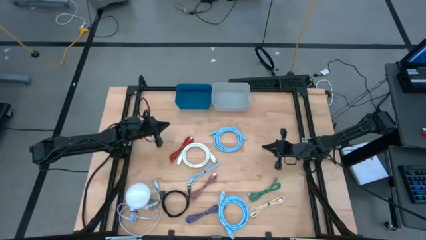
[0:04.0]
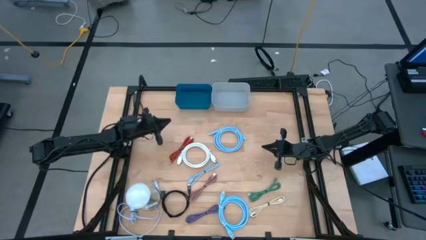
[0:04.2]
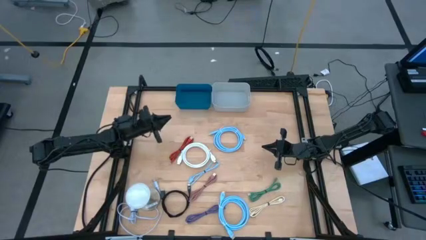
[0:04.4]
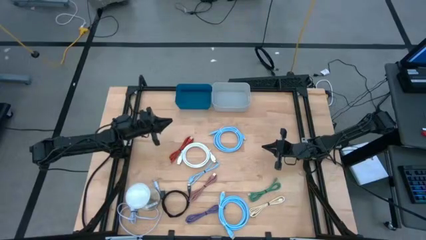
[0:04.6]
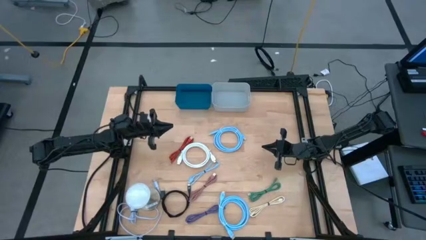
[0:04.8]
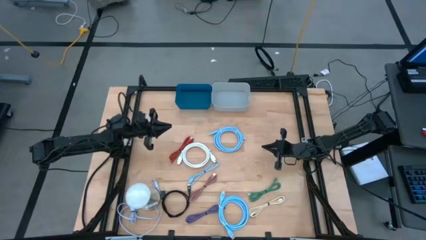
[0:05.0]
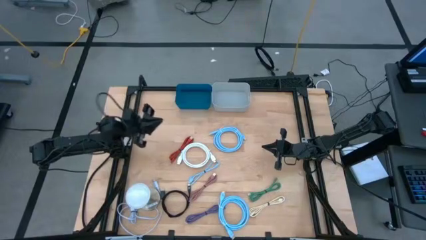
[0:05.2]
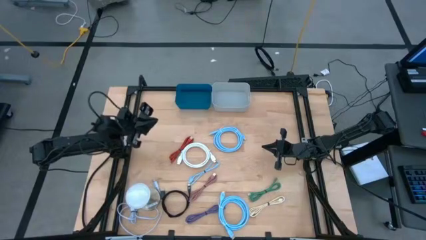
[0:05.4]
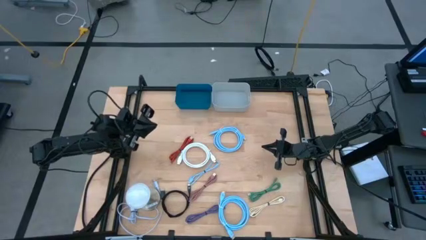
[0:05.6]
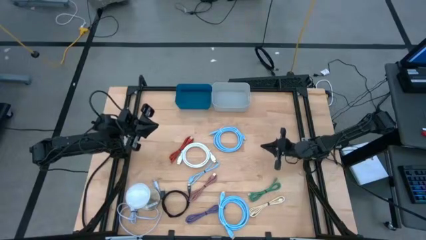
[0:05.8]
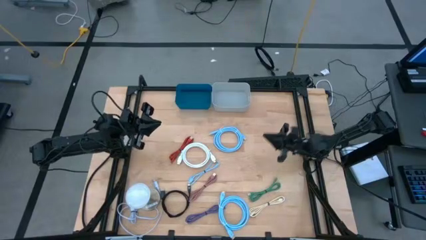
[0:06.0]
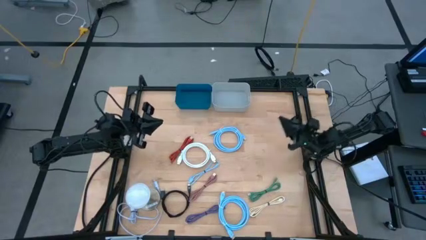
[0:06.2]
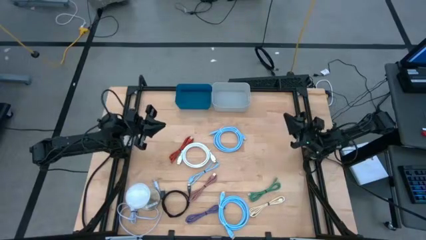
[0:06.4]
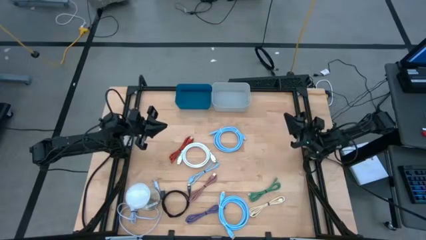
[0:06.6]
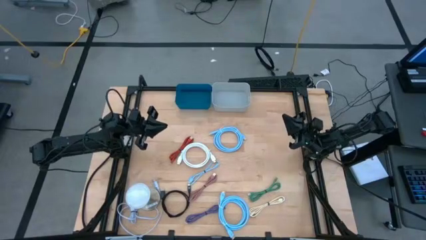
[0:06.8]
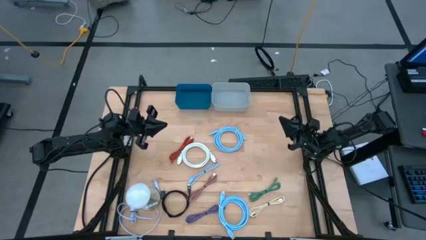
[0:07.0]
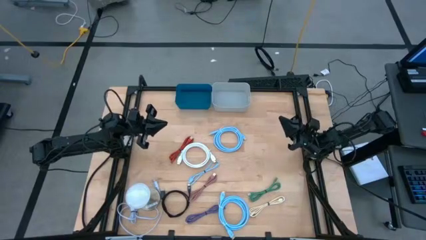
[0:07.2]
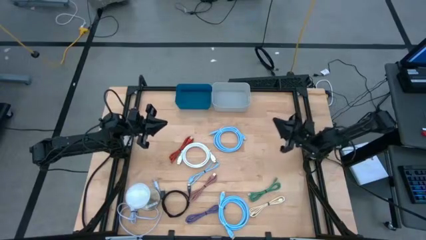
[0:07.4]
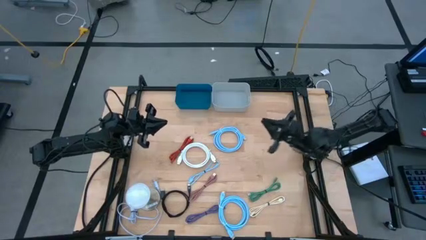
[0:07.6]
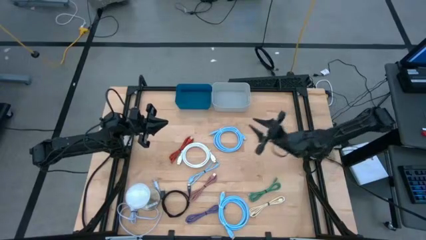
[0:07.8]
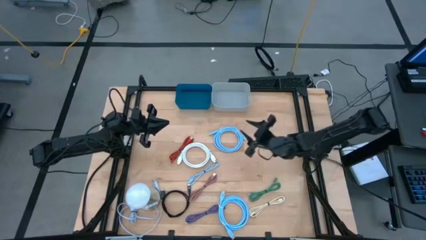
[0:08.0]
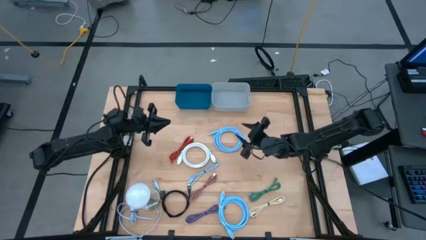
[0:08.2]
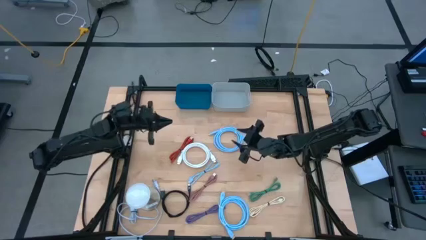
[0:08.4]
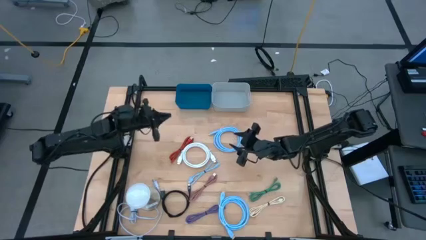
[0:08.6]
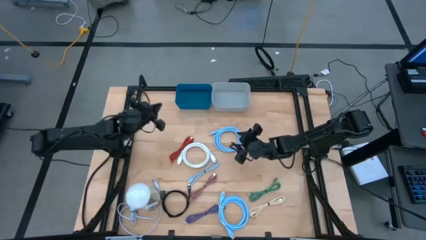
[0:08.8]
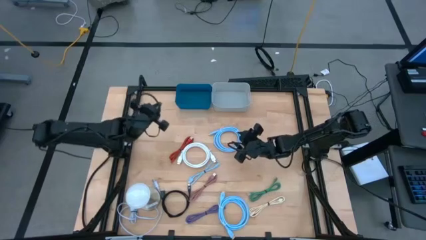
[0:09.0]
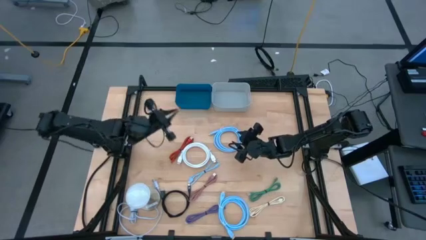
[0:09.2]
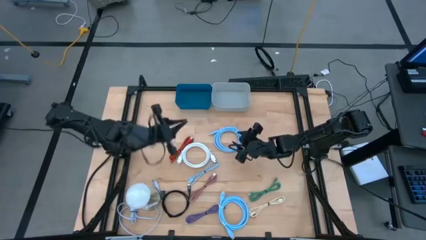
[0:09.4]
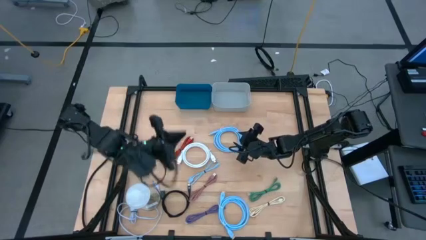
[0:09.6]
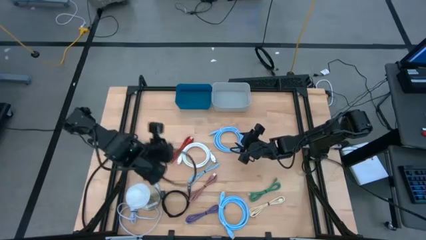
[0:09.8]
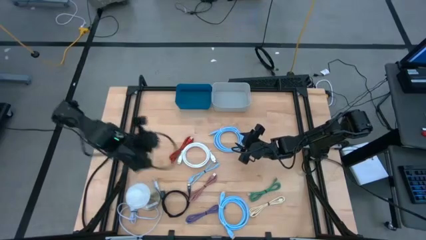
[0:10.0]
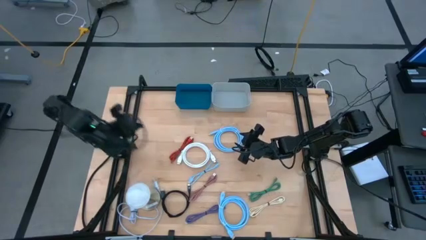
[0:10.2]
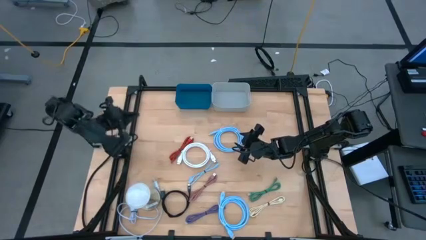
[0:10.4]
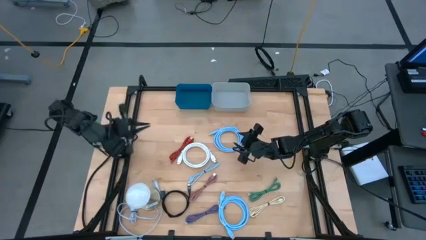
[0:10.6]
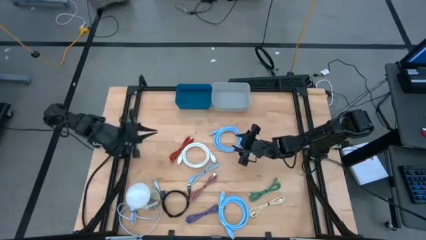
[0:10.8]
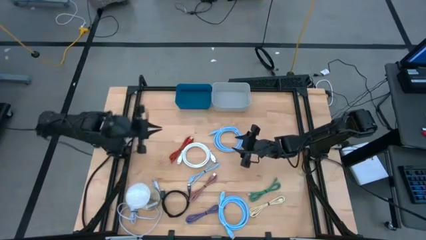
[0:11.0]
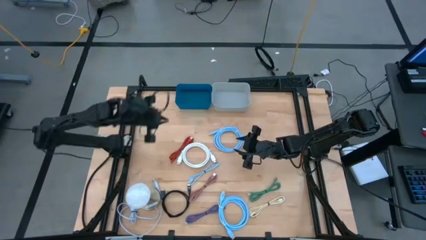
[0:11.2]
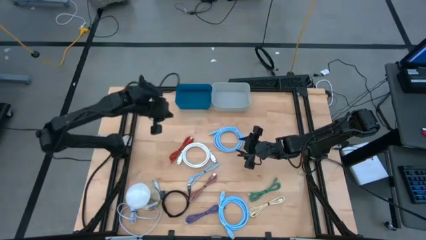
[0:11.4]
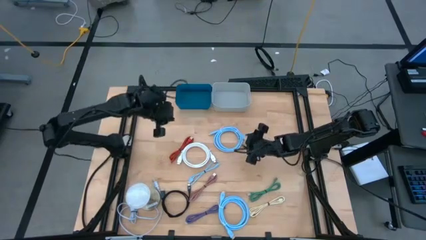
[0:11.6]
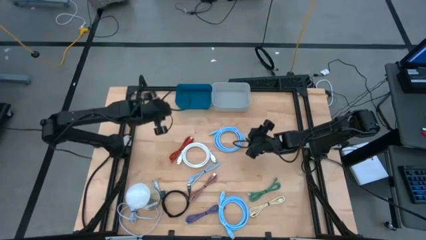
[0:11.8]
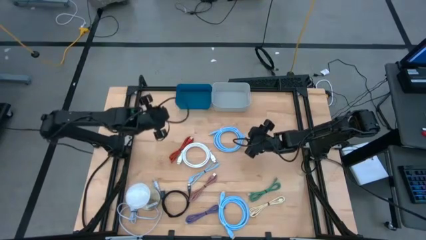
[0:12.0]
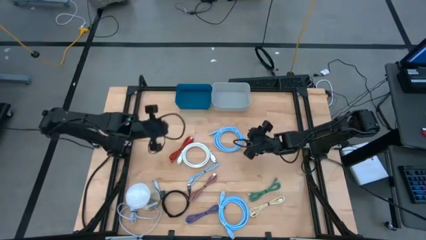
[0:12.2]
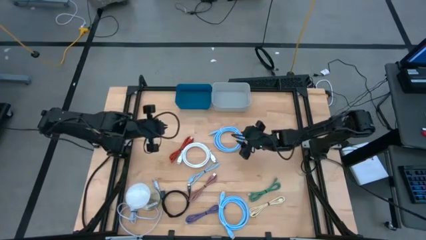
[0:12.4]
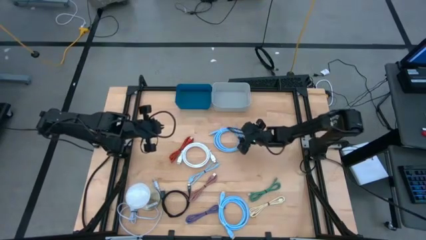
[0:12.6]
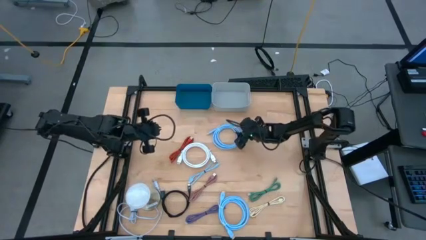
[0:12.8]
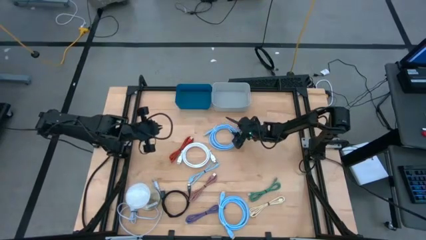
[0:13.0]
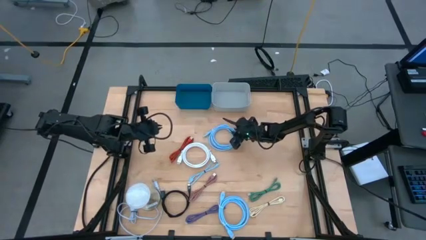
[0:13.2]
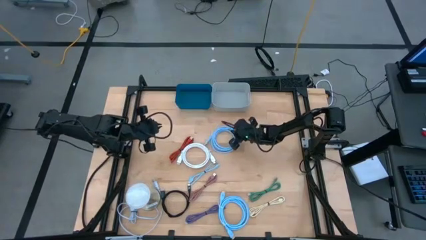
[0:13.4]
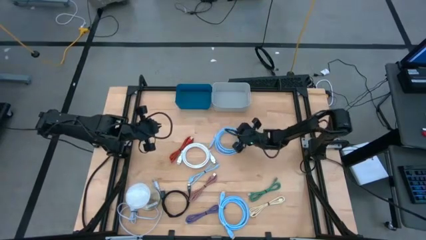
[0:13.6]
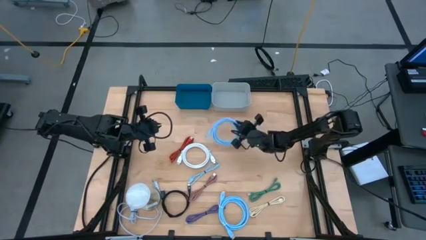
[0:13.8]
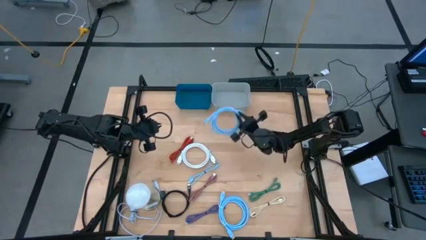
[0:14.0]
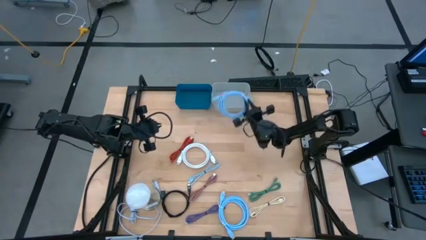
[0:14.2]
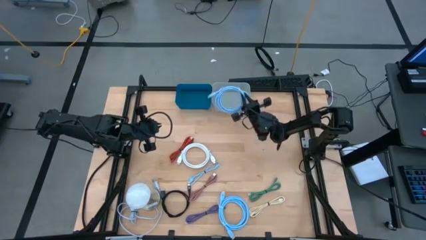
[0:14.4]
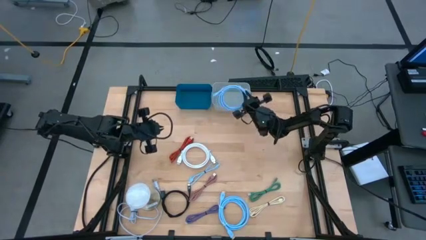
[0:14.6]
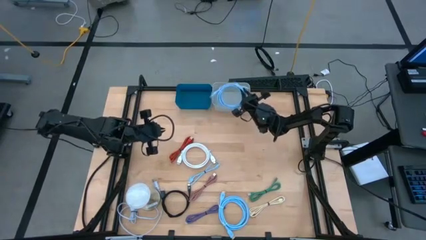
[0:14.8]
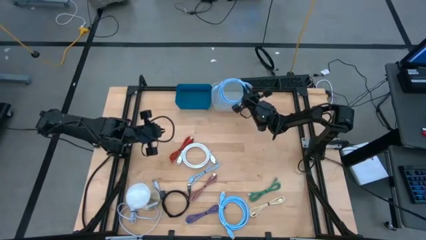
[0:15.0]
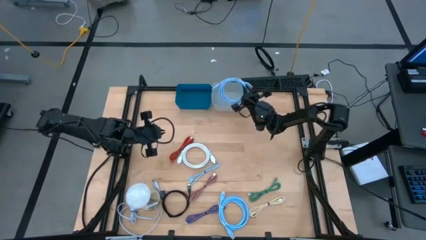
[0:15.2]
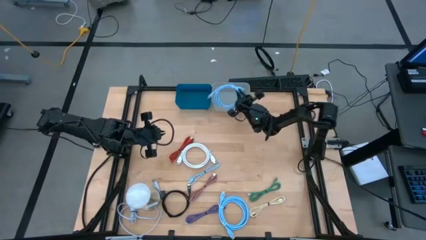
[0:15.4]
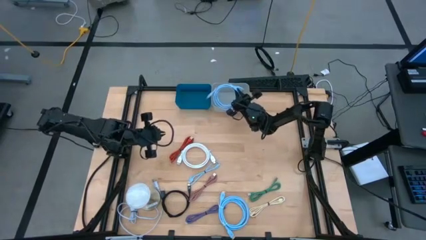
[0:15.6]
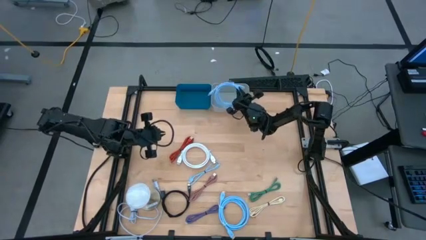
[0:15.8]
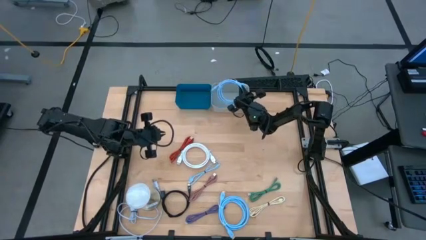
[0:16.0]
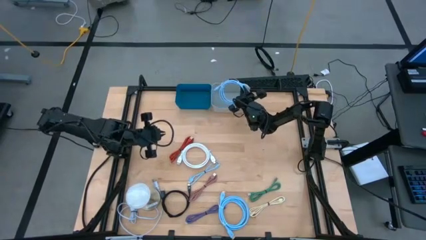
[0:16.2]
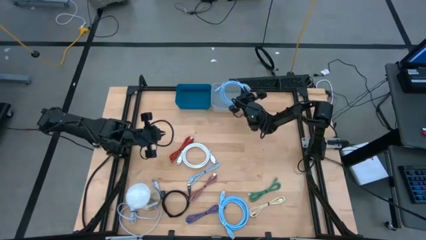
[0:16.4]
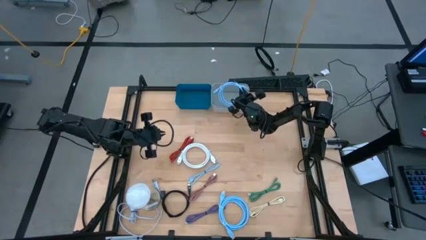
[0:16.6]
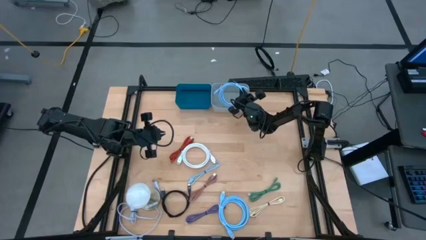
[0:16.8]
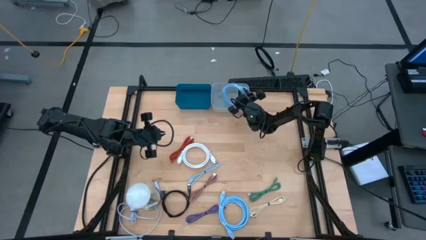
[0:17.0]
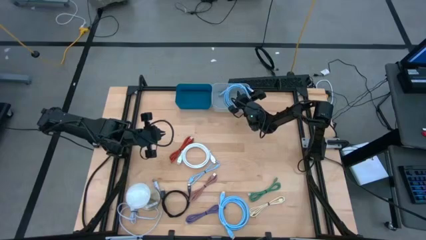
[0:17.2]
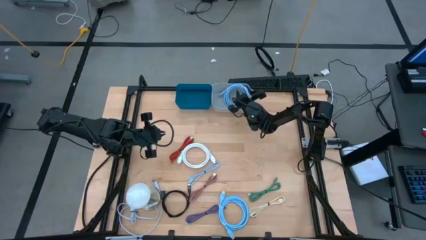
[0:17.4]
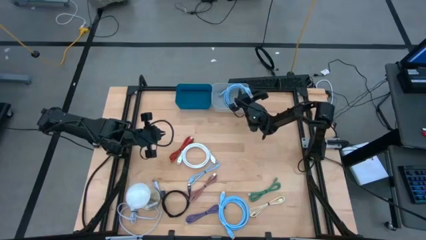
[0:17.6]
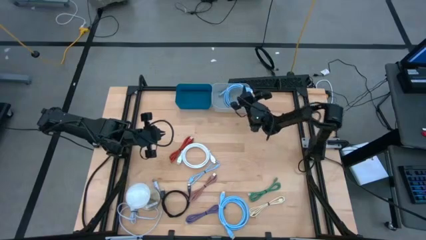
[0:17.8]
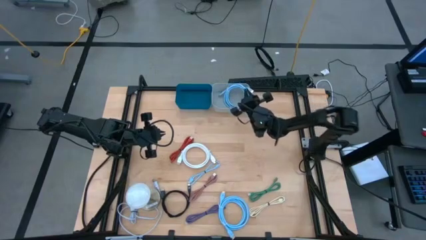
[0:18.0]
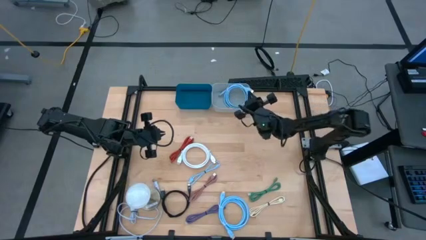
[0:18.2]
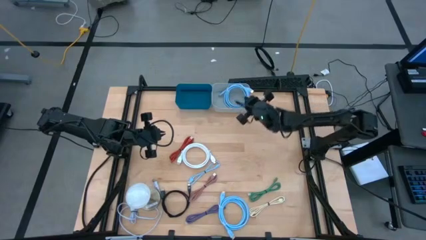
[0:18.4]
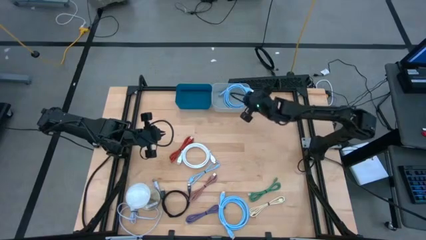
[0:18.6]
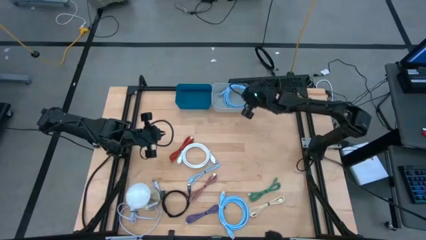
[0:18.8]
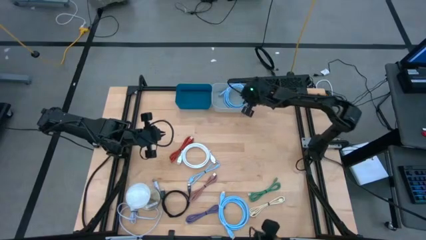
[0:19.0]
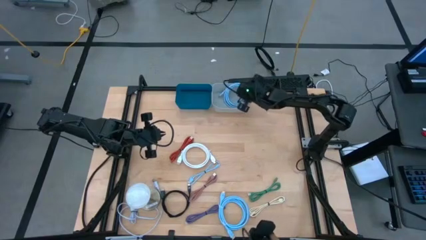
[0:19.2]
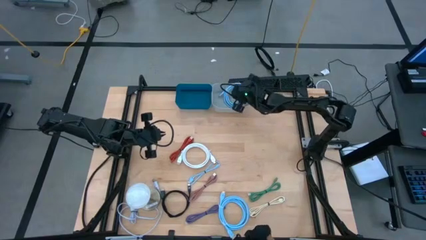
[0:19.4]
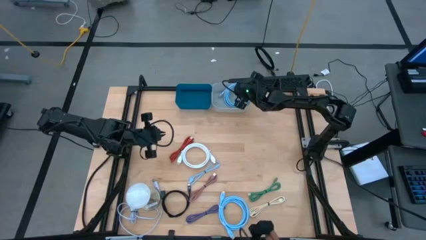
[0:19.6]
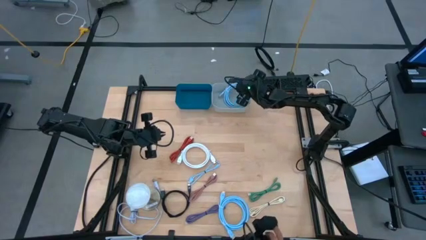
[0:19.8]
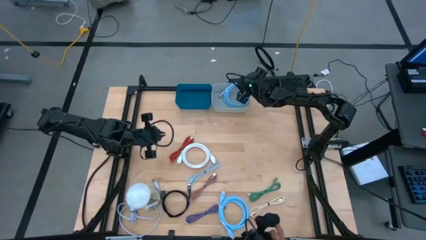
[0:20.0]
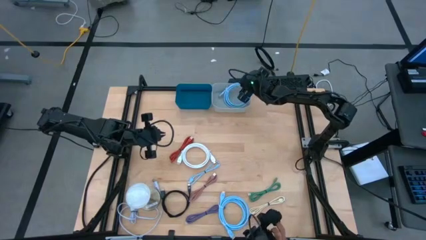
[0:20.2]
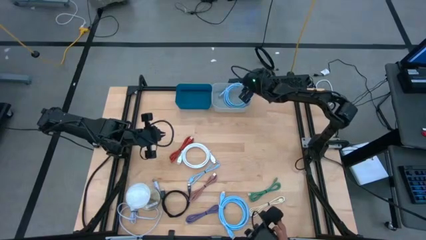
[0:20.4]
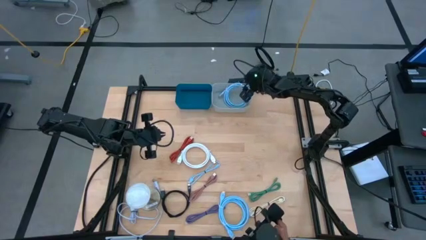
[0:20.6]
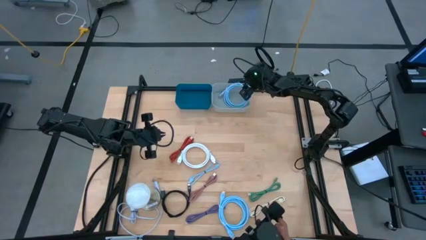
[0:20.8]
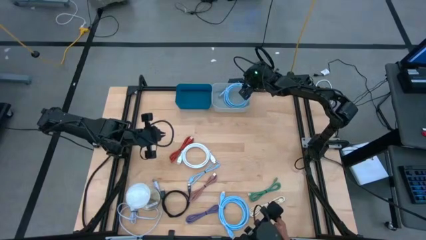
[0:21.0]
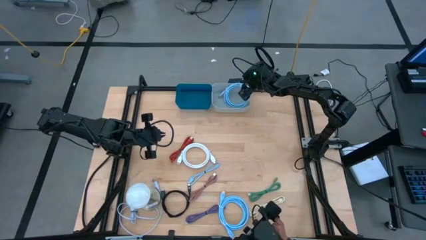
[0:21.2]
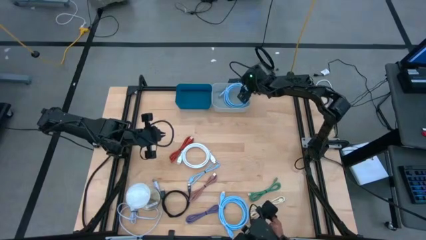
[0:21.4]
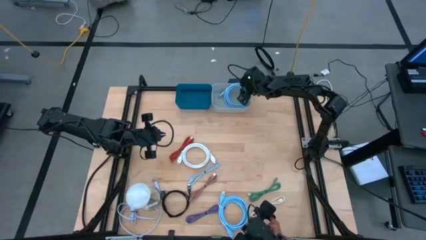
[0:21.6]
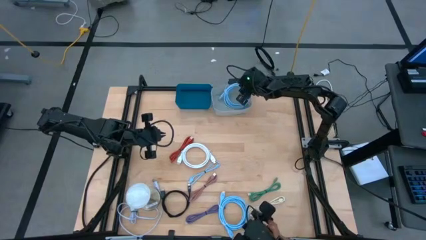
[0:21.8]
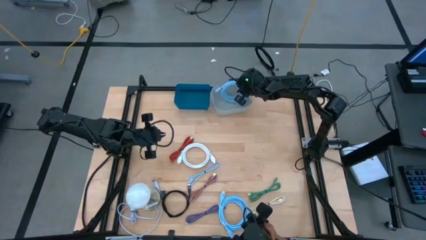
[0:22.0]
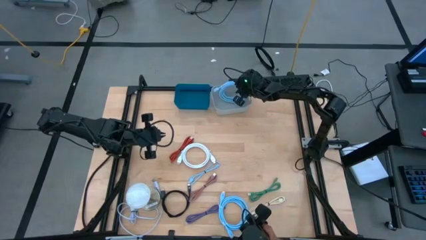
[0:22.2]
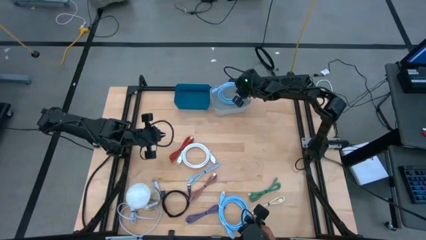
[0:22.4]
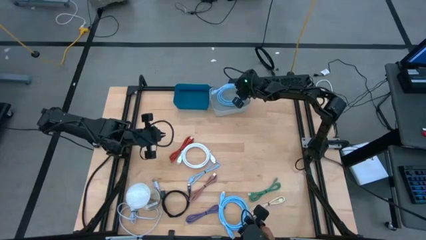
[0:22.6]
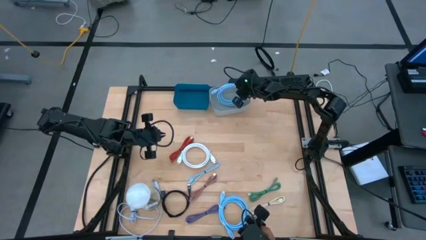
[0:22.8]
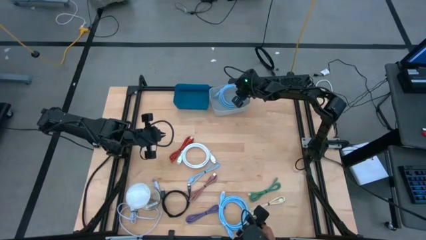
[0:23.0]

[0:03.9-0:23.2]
Task: Pick & Place USB Port
Put the top blue hdmi cable into the gray bin
